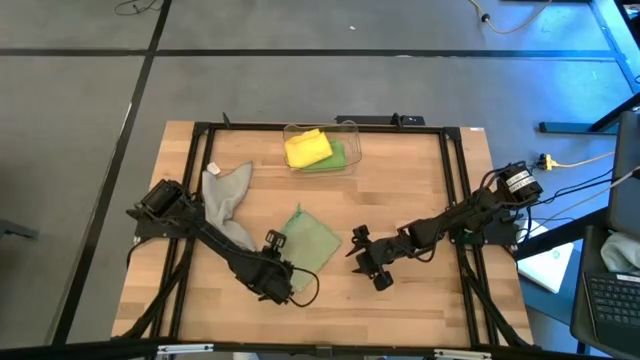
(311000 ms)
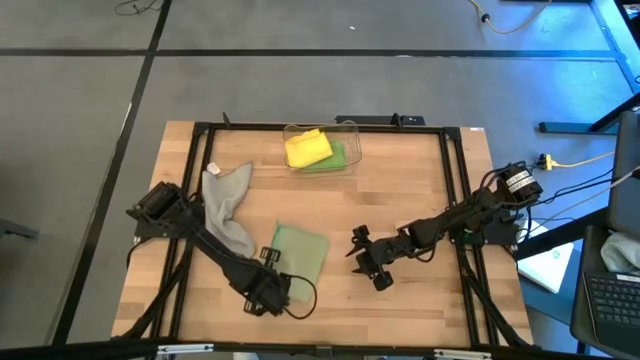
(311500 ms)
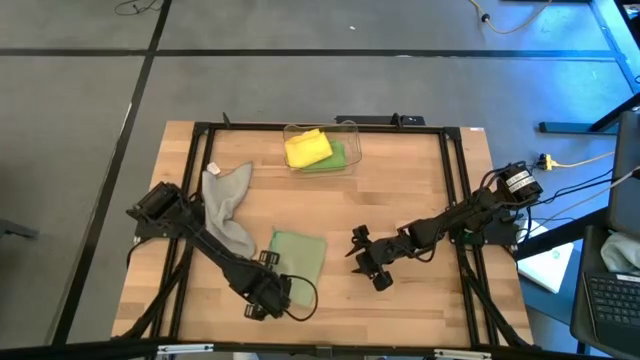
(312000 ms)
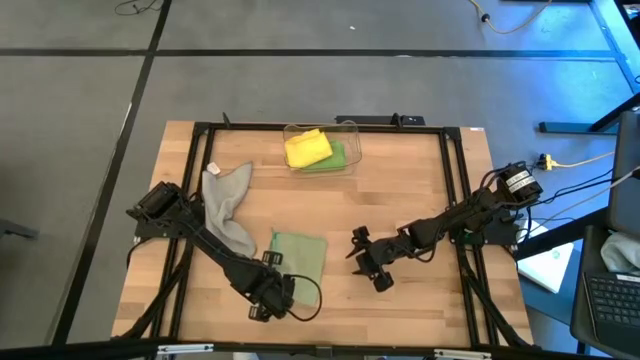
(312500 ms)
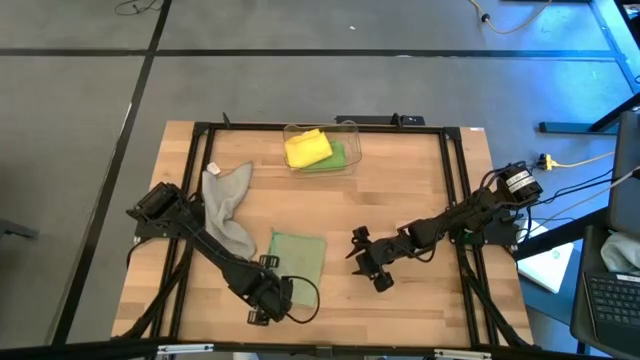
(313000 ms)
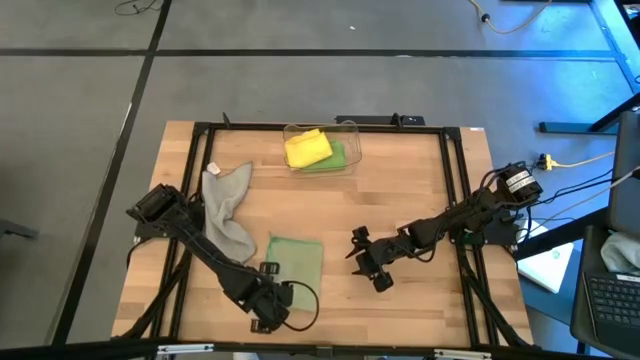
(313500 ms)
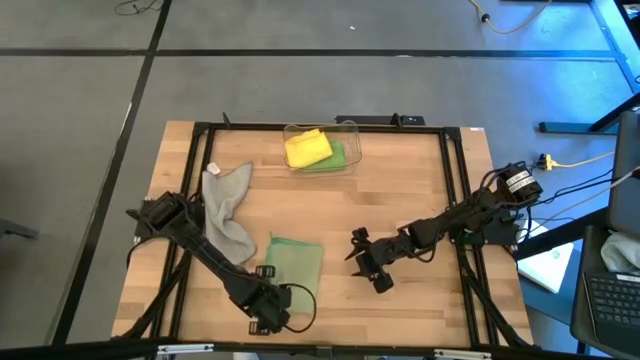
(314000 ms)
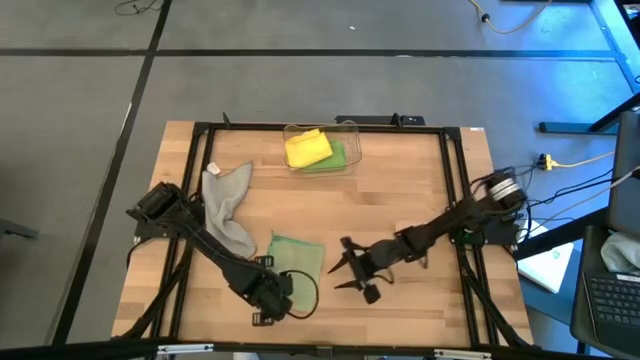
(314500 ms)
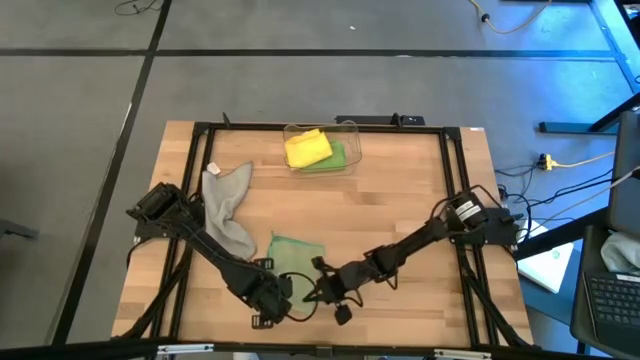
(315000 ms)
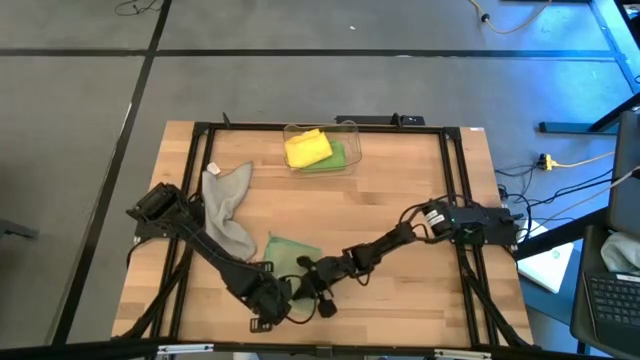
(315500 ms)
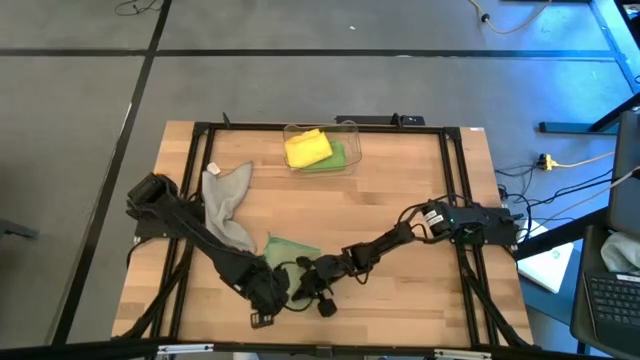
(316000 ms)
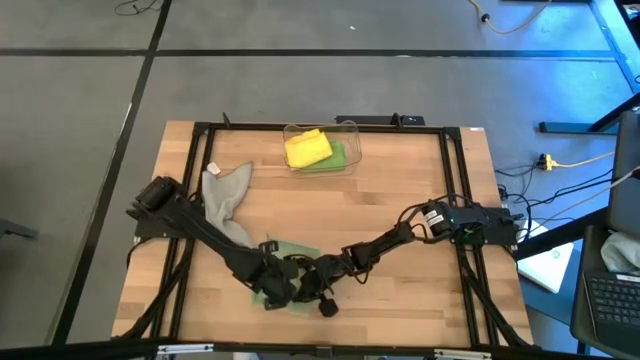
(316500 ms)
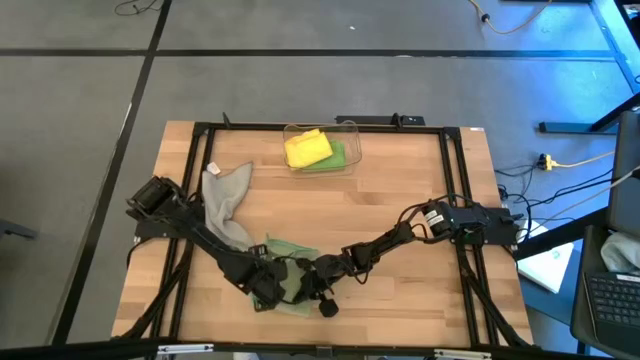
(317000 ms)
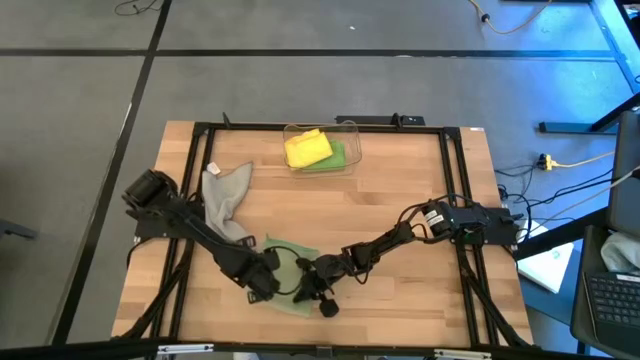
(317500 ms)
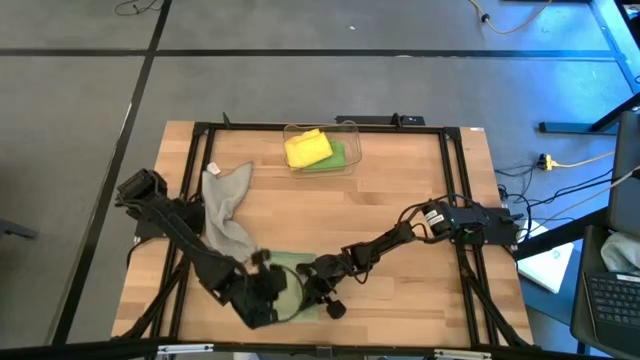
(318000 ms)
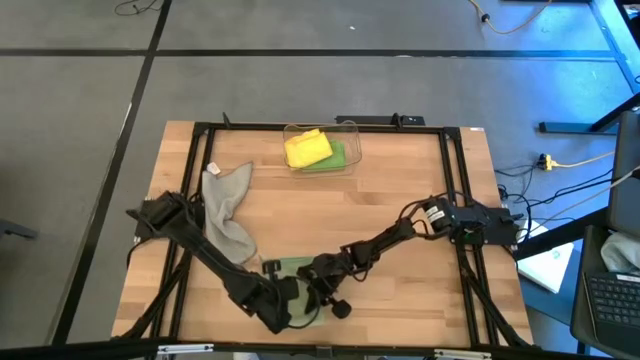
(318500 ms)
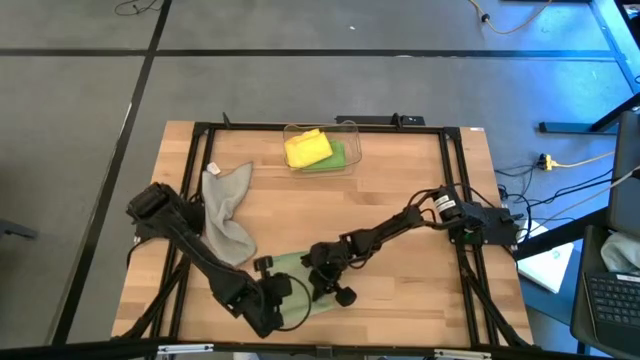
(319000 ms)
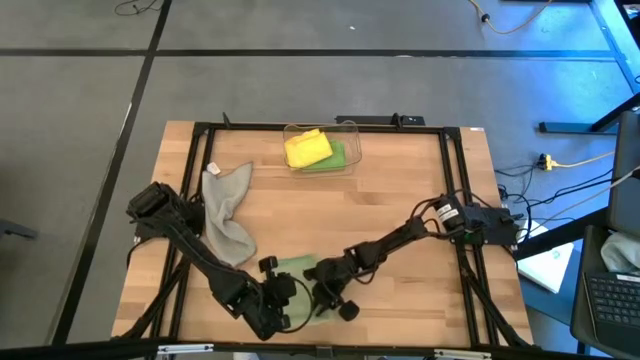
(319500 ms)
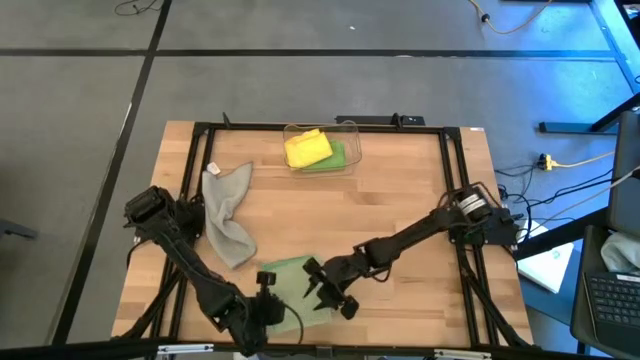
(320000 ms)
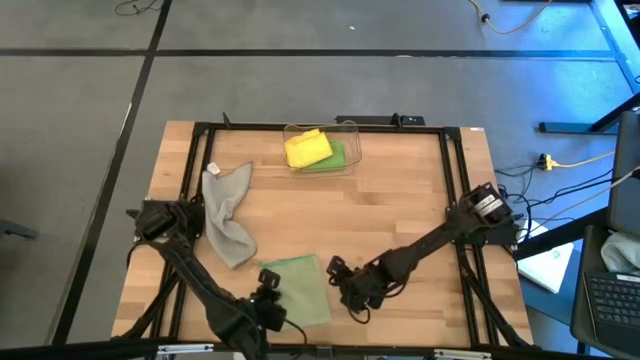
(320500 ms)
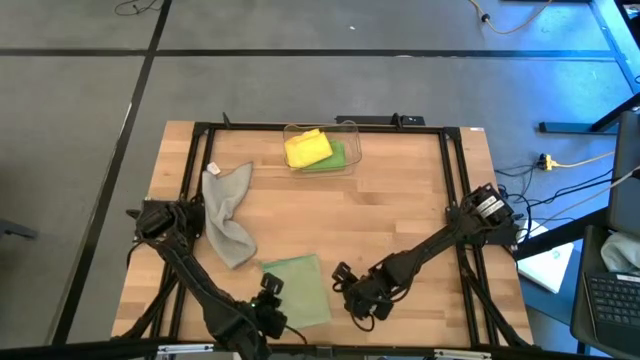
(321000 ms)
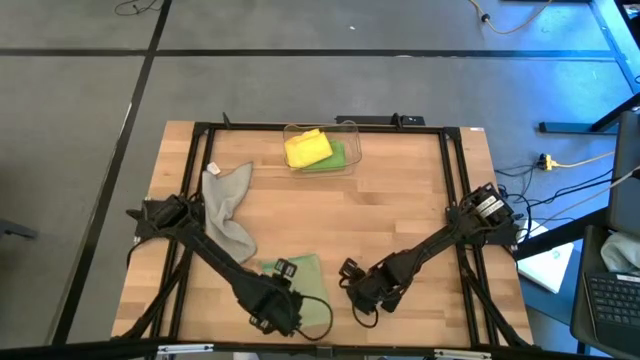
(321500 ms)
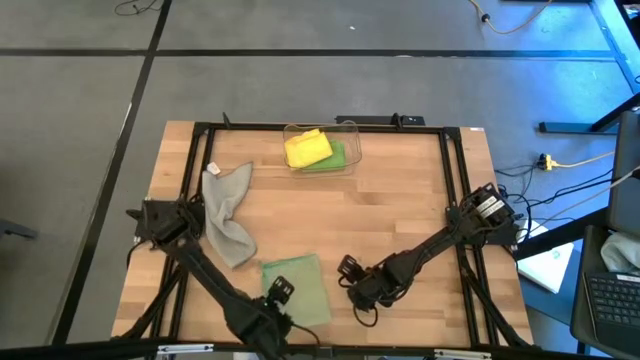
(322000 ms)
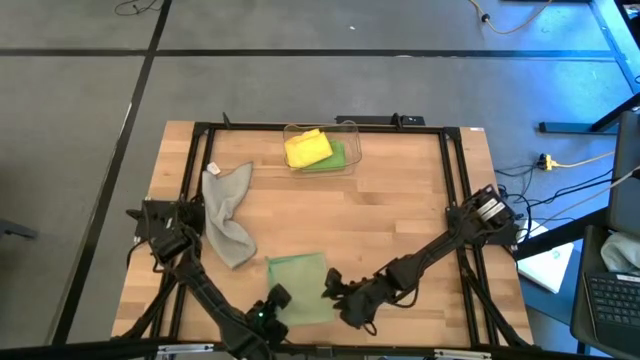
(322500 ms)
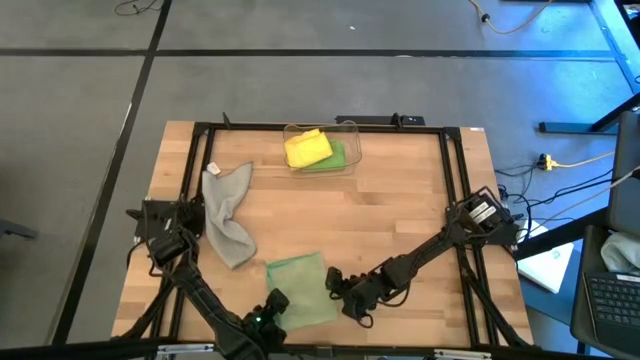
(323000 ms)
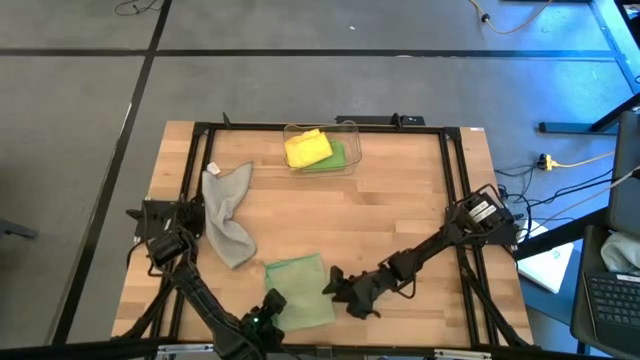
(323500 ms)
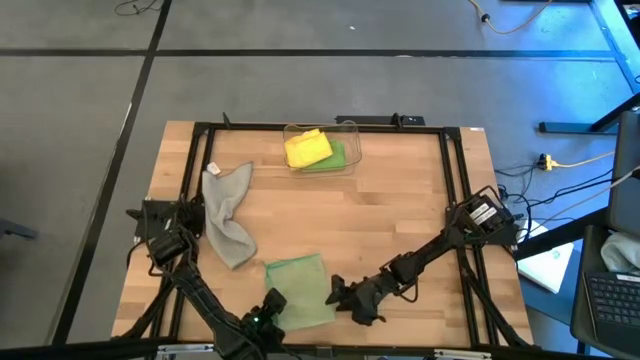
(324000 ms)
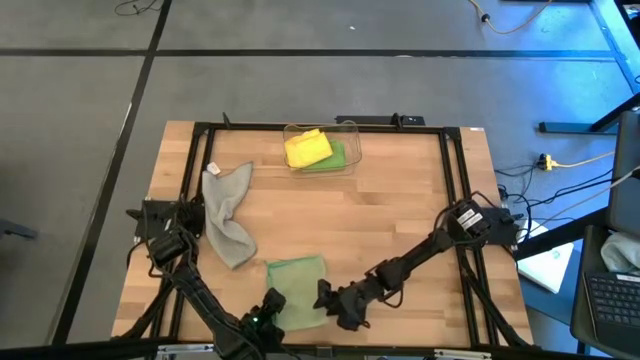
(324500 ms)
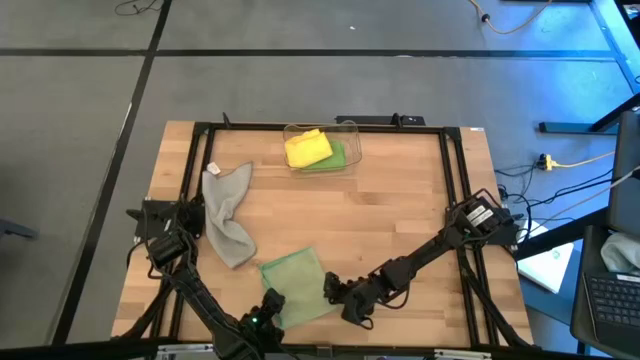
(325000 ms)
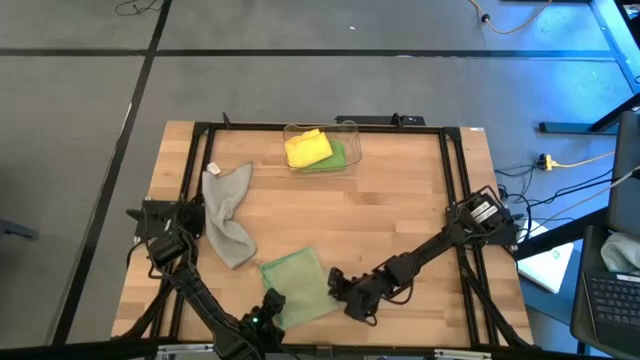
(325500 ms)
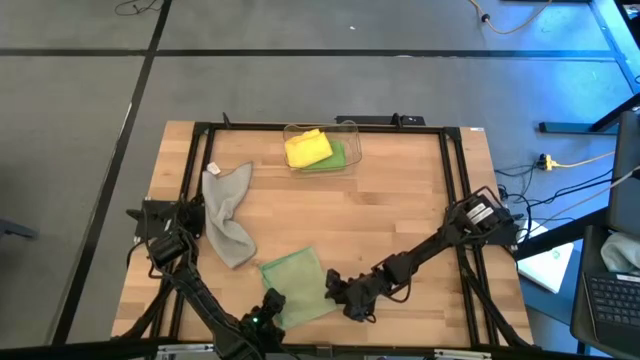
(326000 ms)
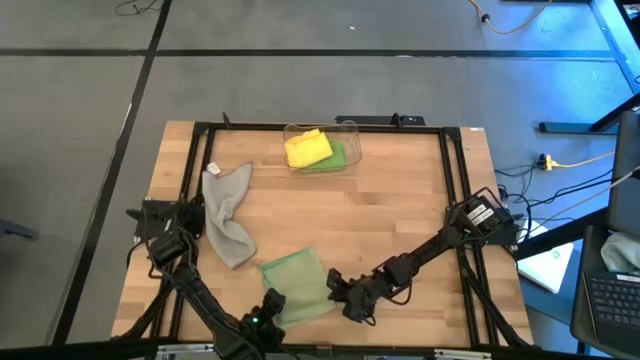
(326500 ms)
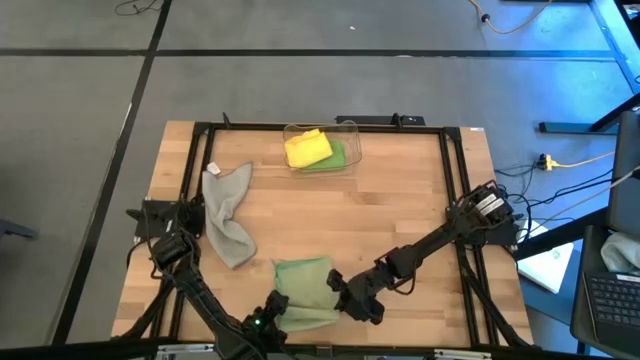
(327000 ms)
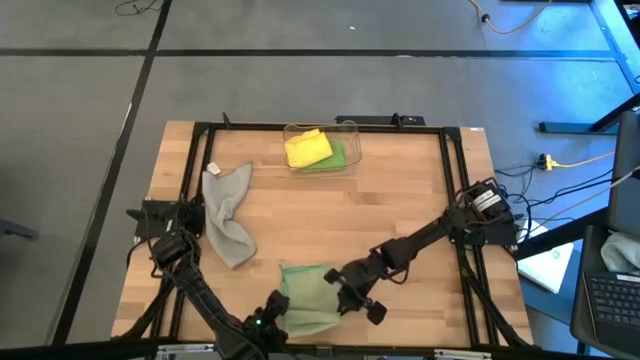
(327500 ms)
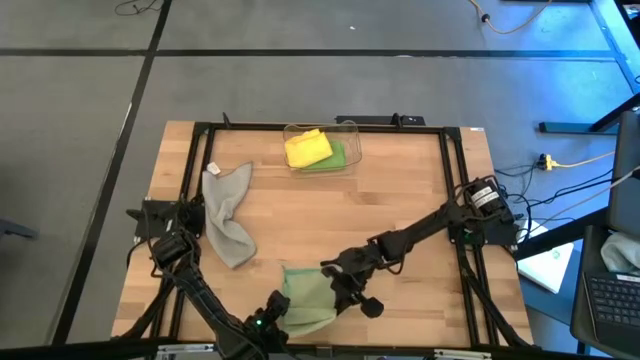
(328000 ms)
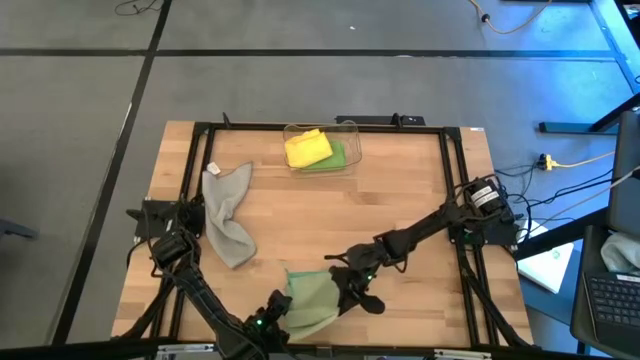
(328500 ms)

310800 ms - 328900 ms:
Task: Fold microfiber towels
Fold the light green microfiber cloth

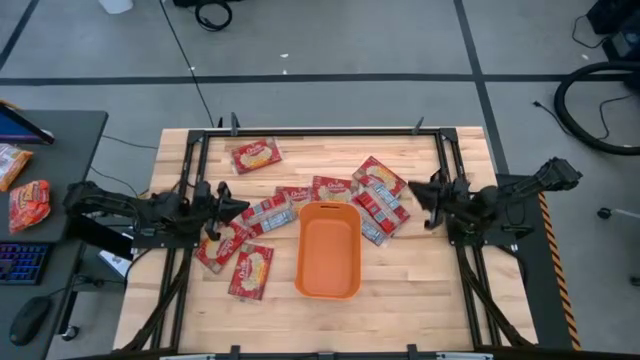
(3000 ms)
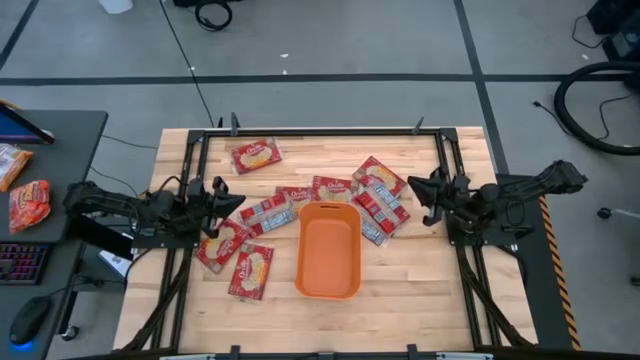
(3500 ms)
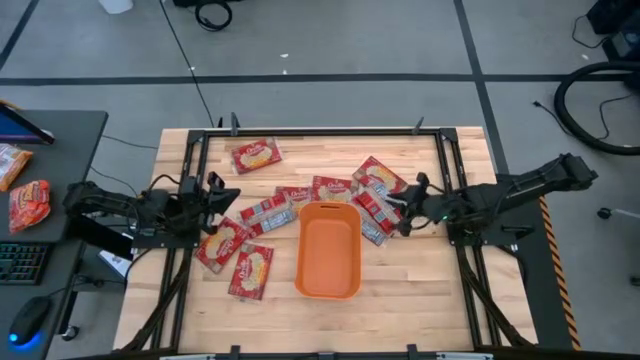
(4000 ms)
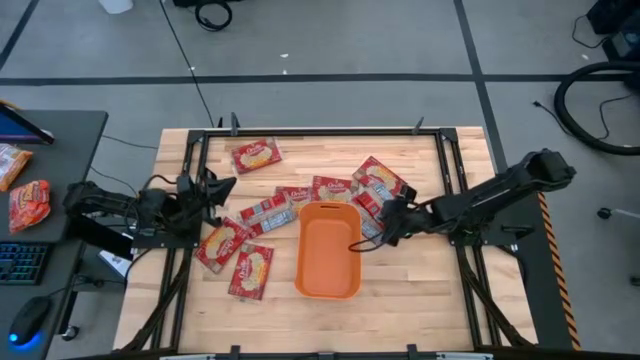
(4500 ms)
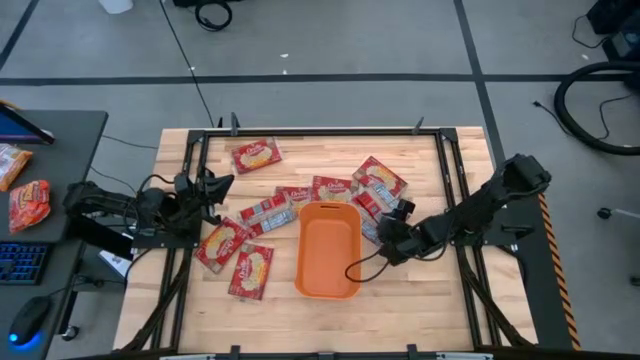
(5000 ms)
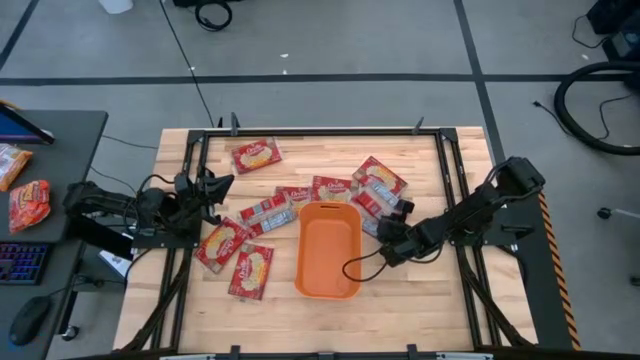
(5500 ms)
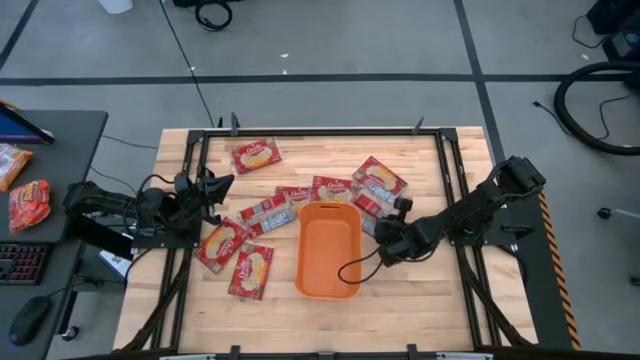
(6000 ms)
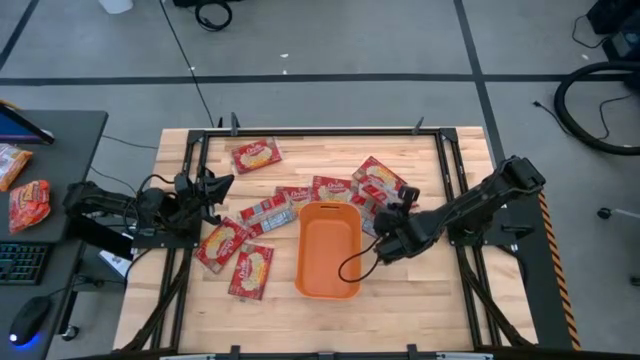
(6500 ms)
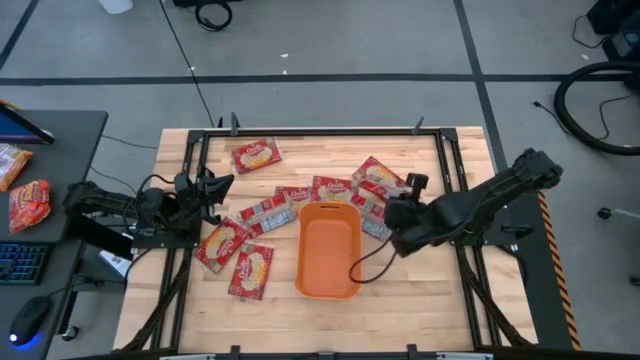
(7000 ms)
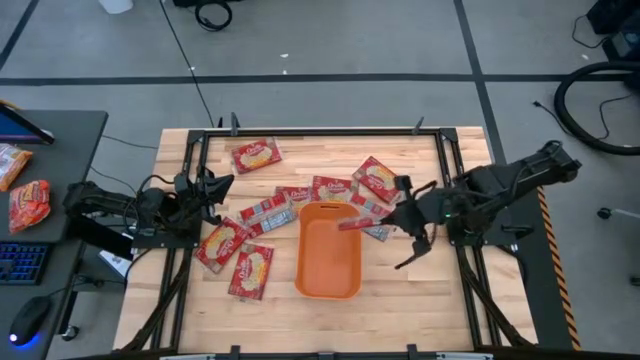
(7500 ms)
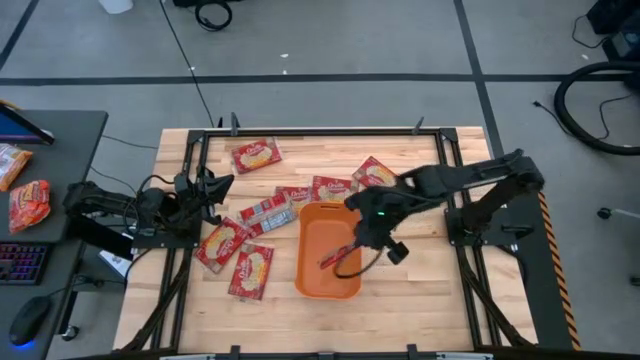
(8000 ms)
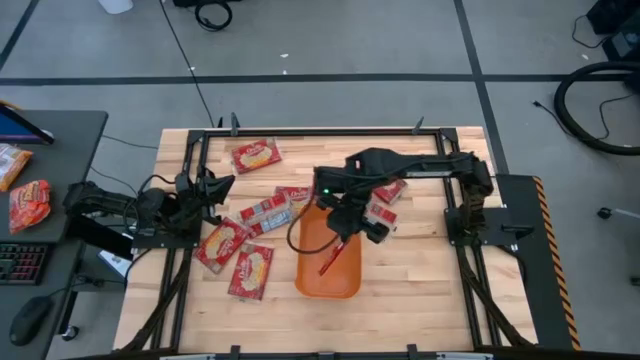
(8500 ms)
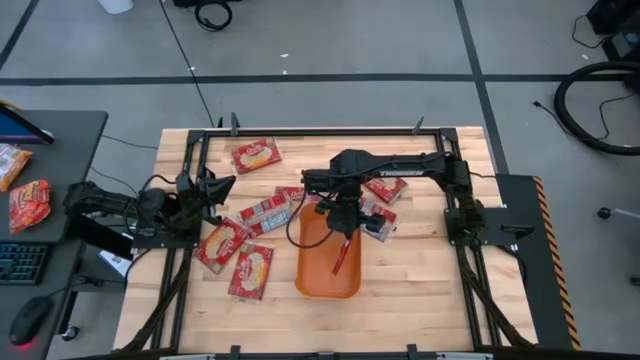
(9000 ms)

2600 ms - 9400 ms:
Task: Sort popcorn bags into baskets
Put the red popcorn bag into the orange bin
